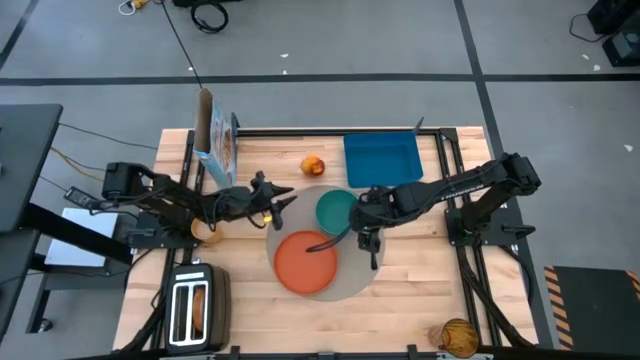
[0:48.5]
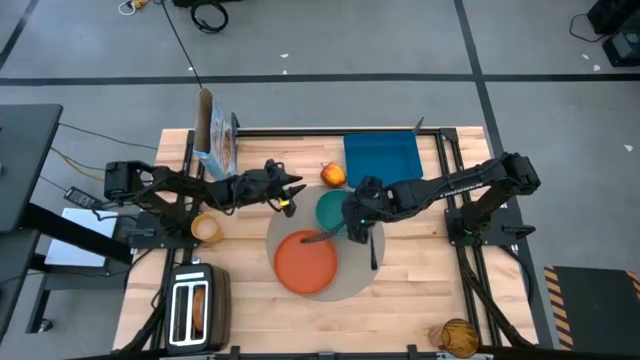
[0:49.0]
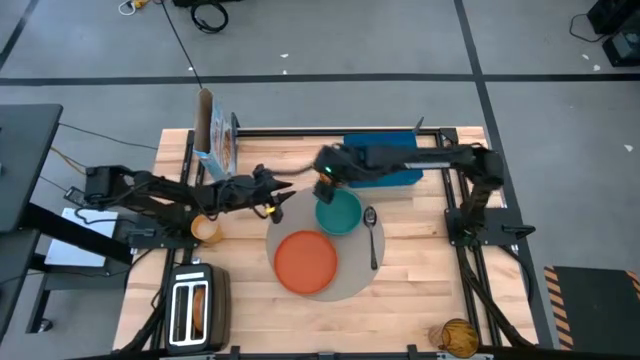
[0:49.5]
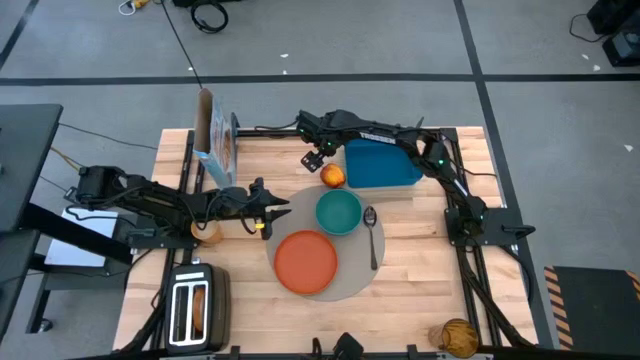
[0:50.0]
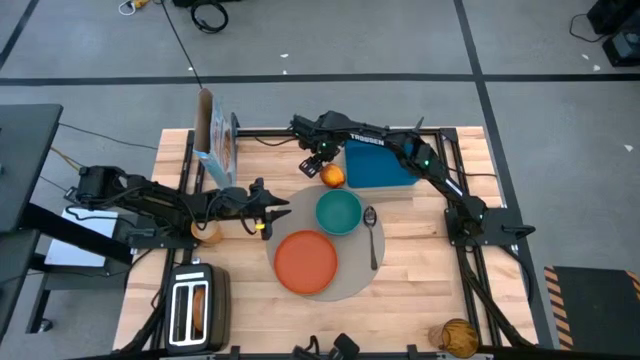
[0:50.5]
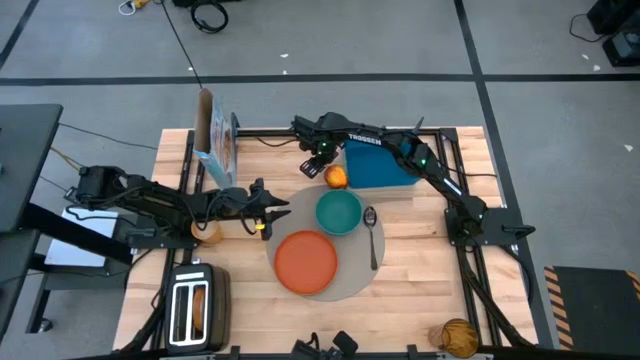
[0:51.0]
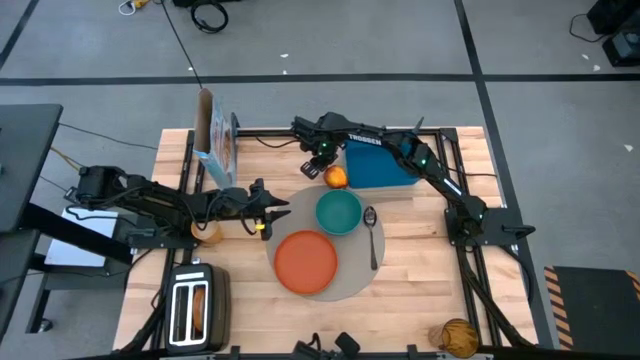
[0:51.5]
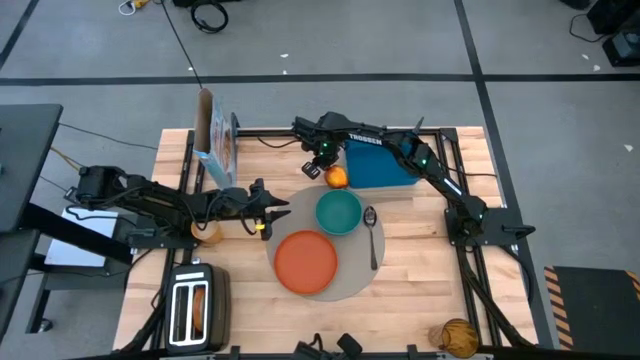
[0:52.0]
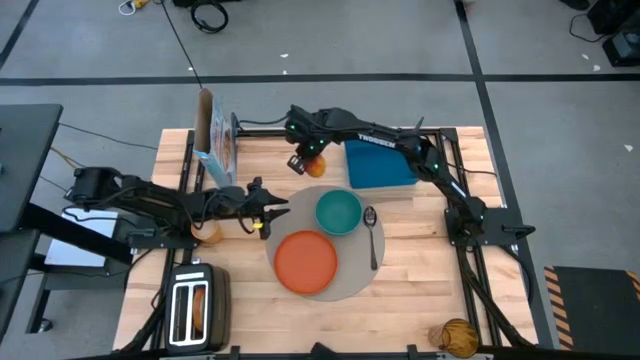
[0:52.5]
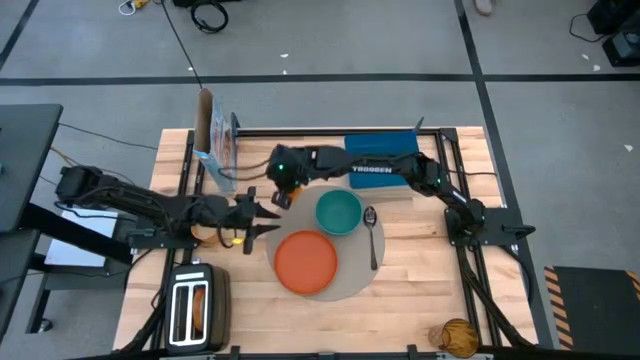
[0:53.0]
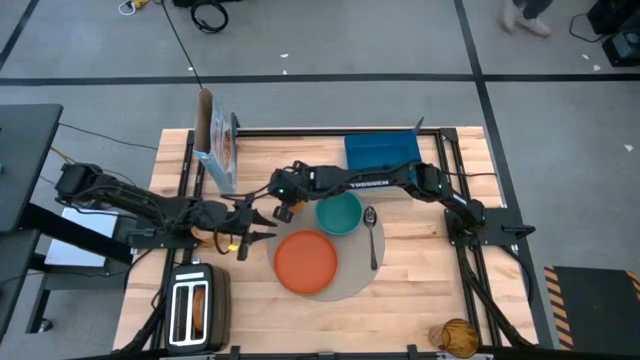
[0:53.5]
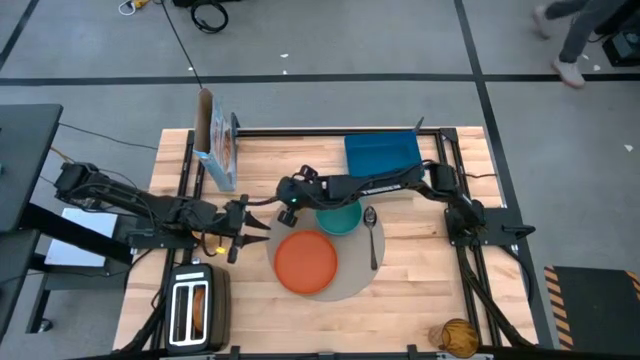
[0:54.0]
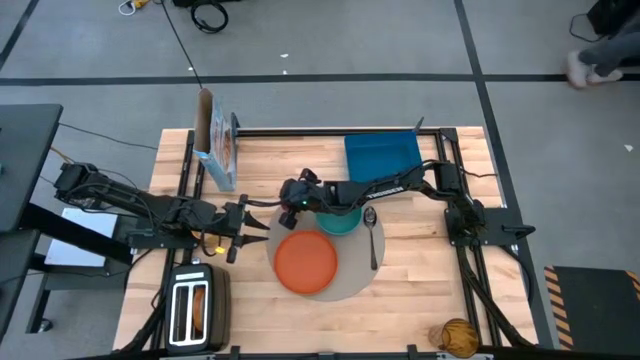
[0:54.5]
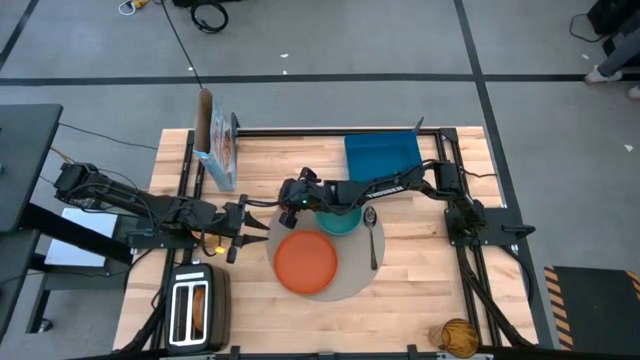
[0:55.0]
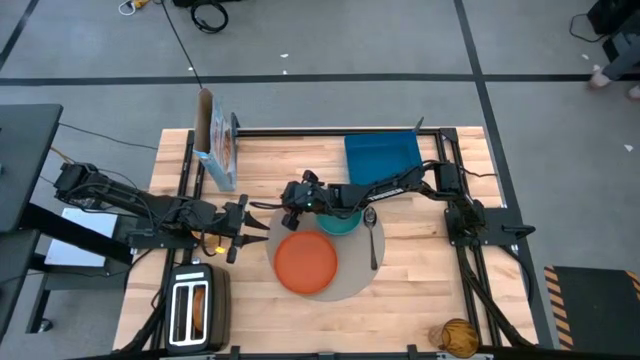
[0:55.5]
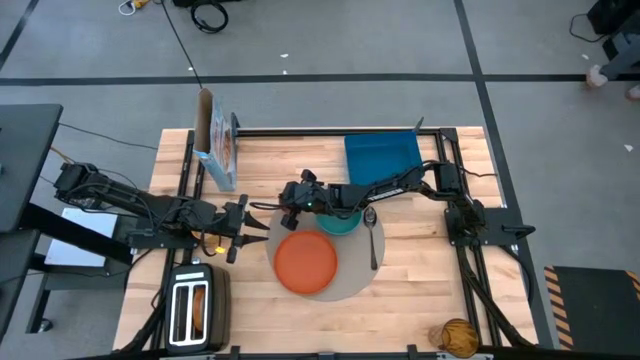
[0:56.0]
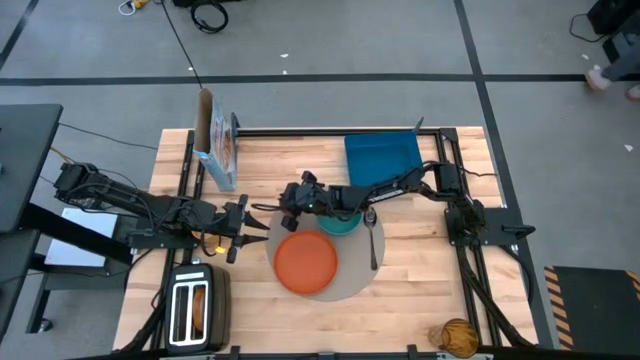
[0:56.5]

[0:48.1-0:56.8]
Task: Arrange a breakfast setting
Put the apple on top left of the round table mat

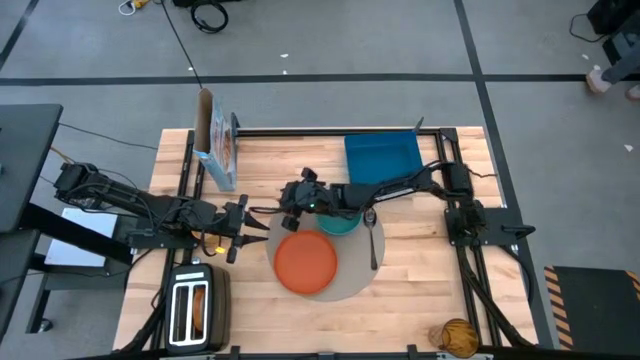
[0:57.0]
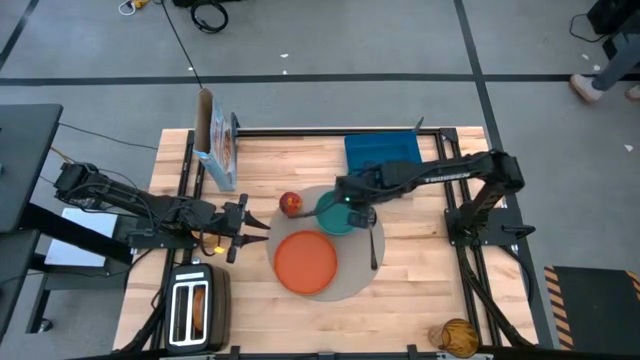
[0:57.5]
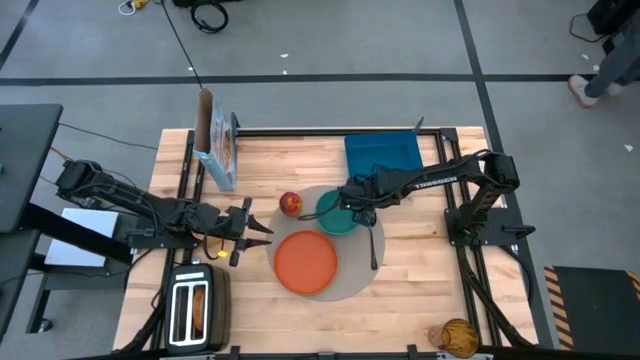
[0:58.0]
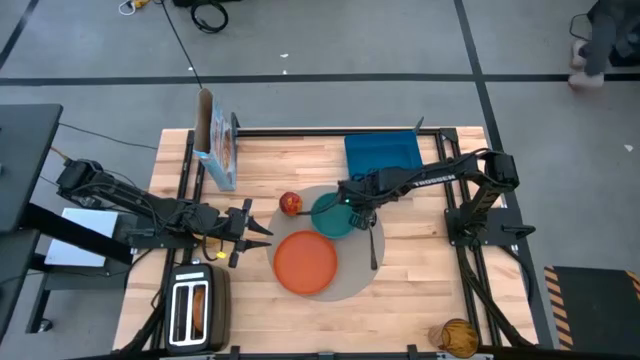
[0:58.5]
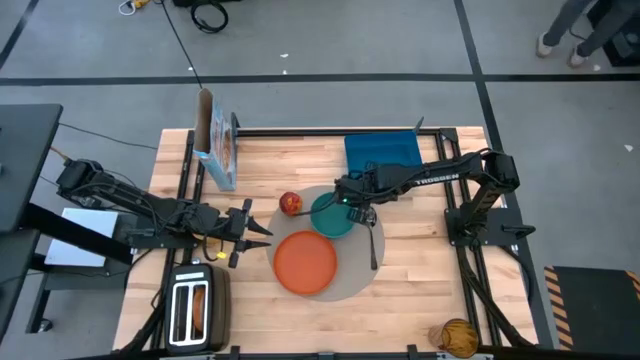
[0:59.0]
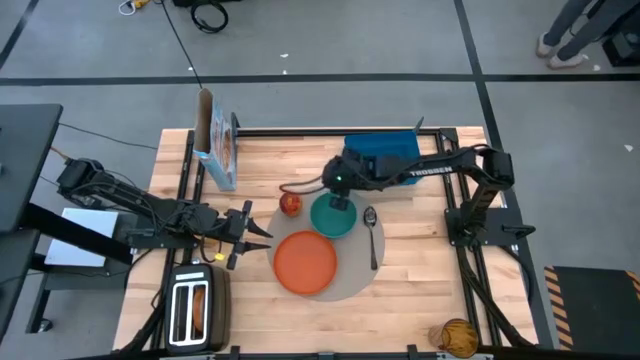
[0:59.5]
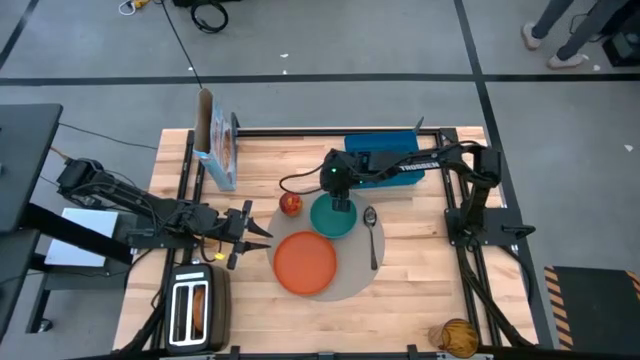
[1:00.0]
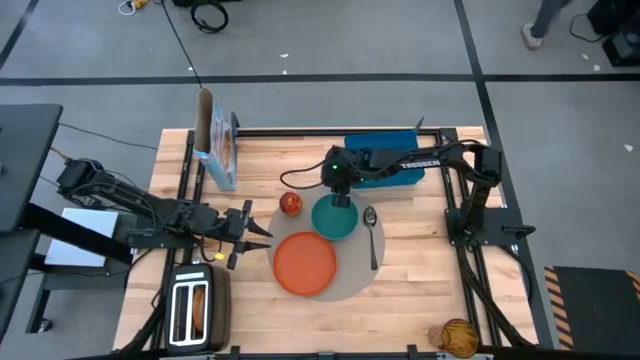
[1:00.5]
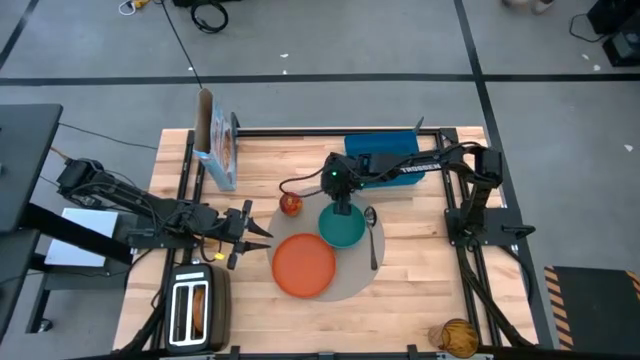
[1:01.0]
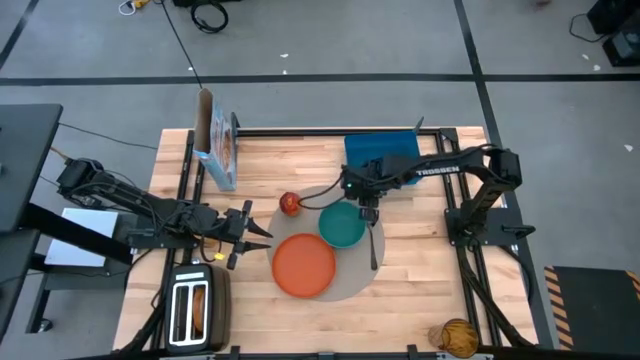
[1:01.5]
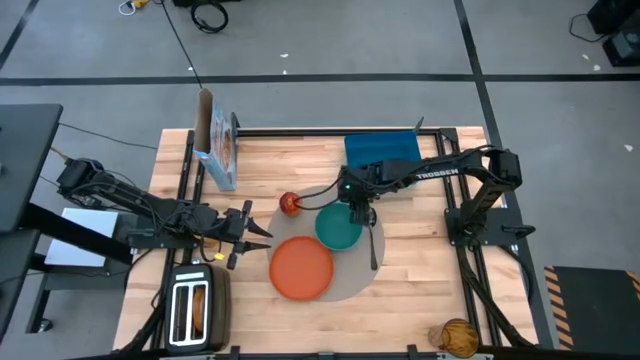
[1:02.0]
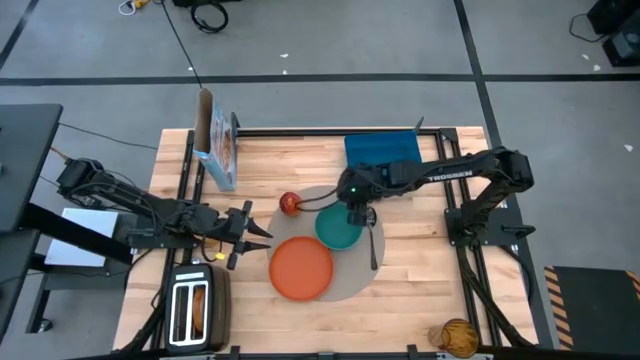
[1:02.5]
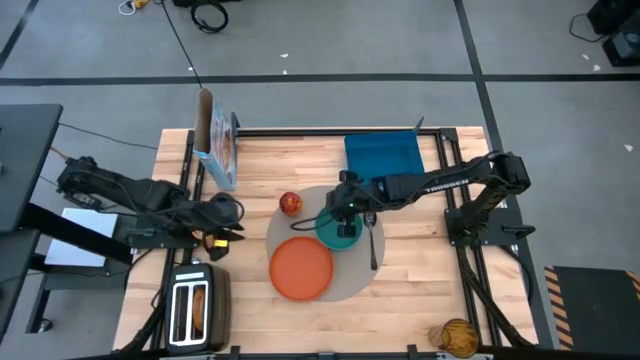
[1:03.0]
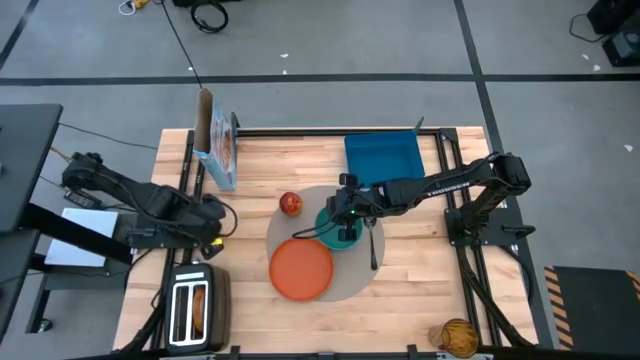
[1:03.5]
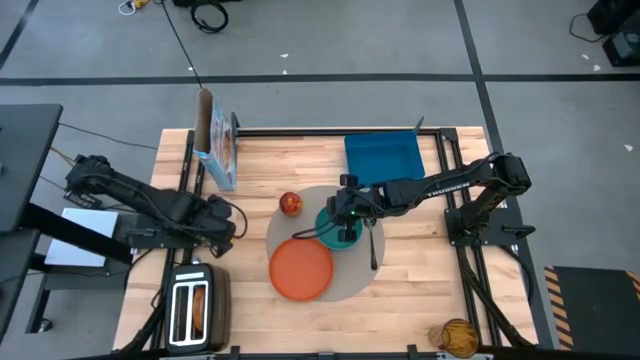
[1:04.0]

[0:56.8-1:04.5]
Adjust the blue bowl position

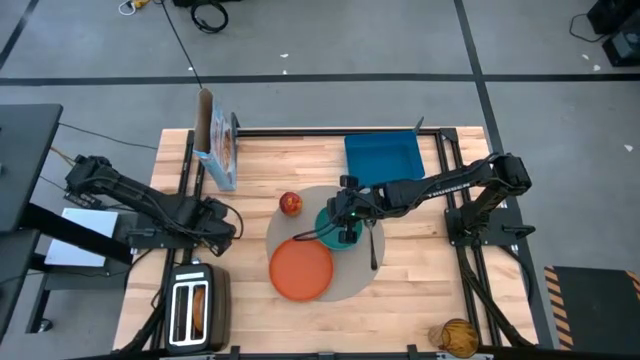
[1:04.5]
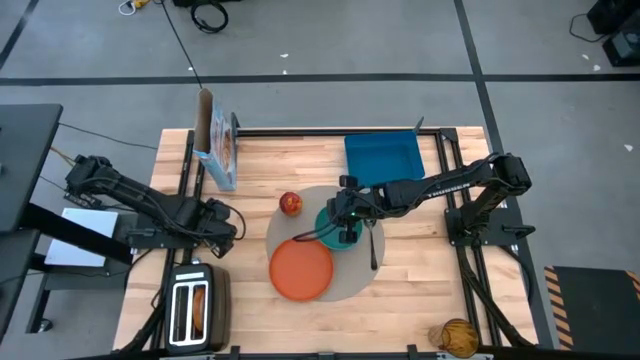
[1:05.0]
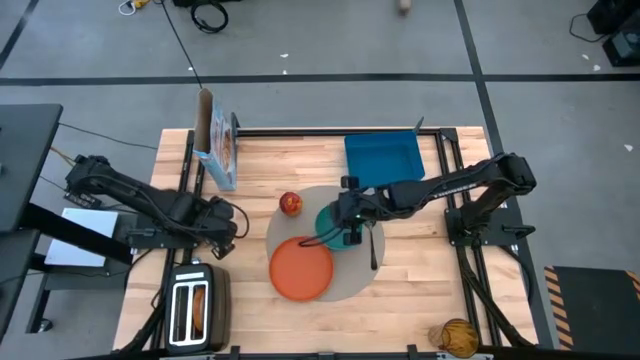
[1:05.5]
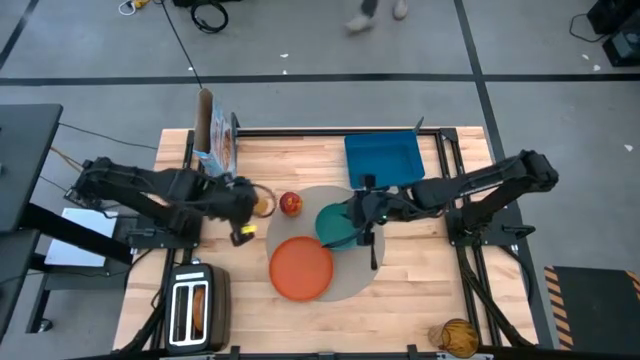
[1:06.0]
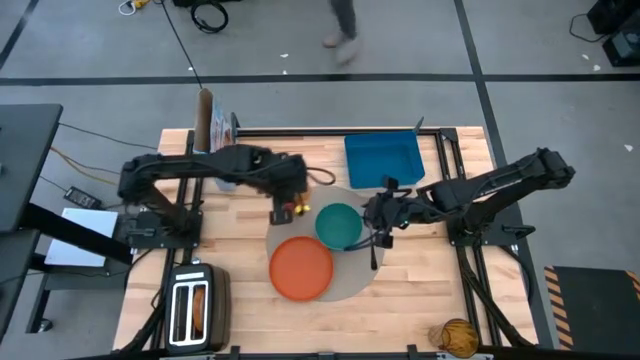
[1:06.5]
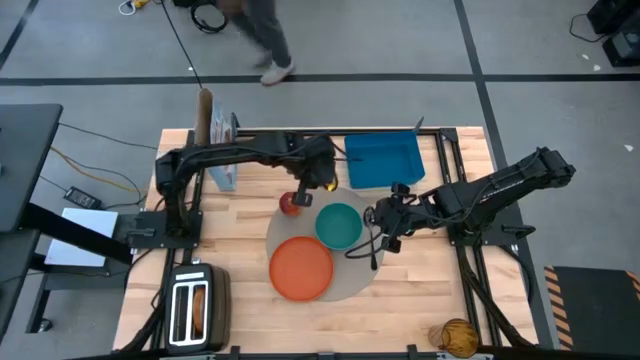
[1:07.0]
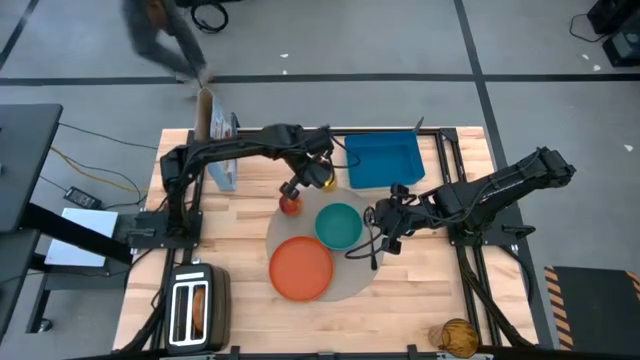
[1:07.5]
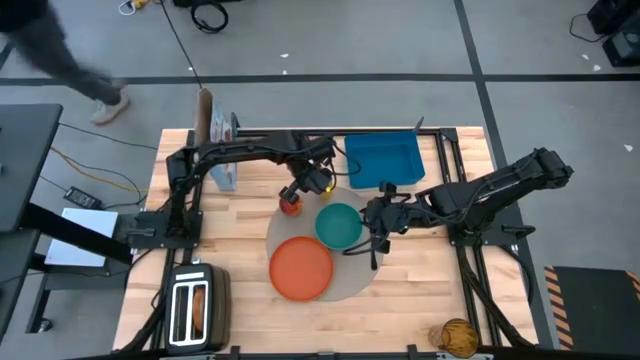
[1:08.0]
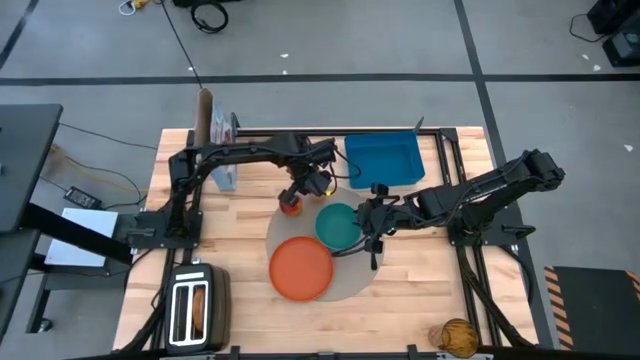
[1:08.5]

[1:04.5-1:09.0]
Put the orange cup with rice grain on top right of the round table mat

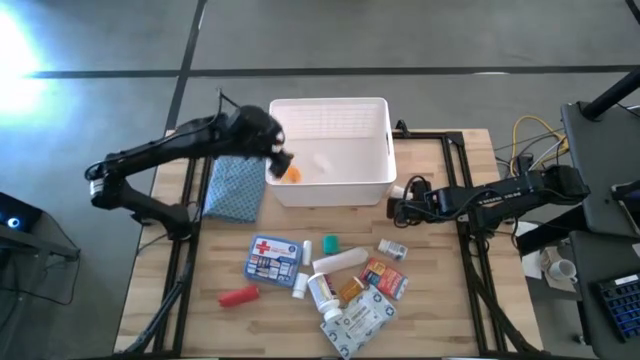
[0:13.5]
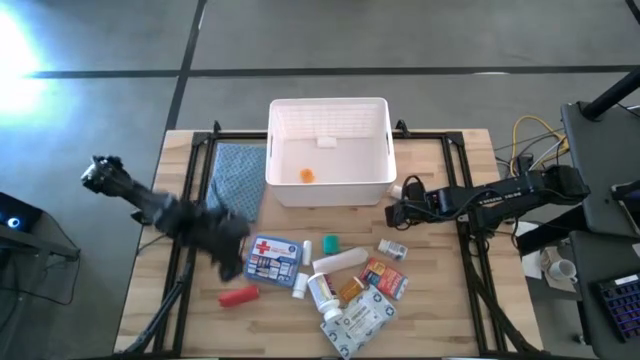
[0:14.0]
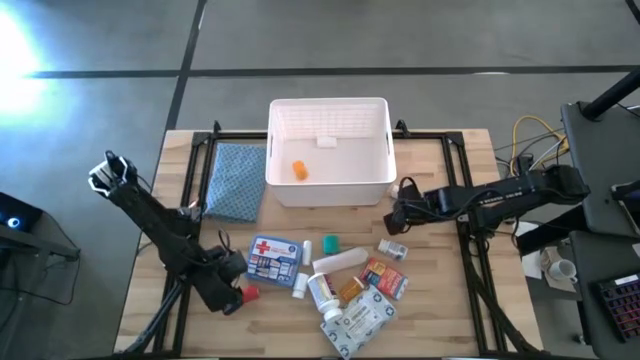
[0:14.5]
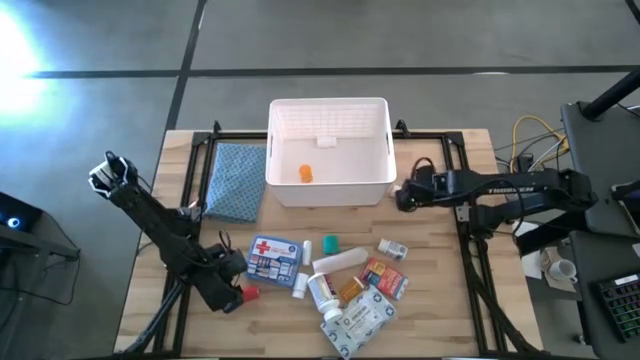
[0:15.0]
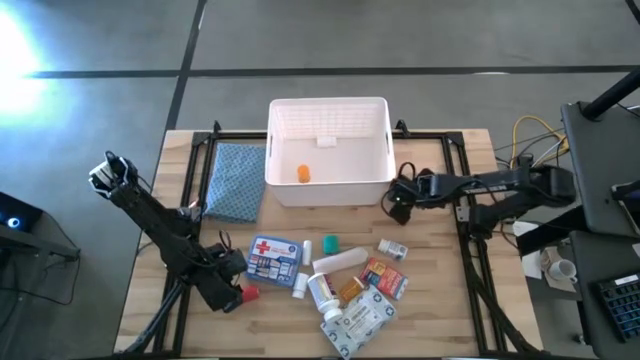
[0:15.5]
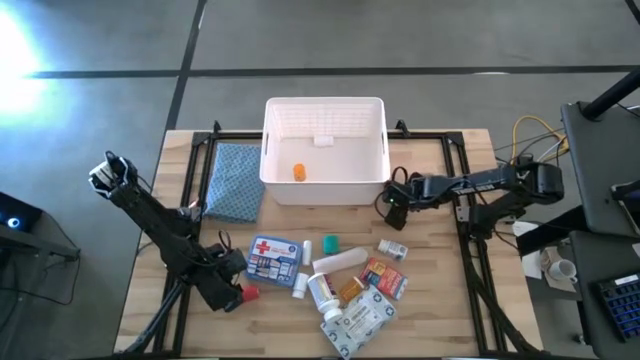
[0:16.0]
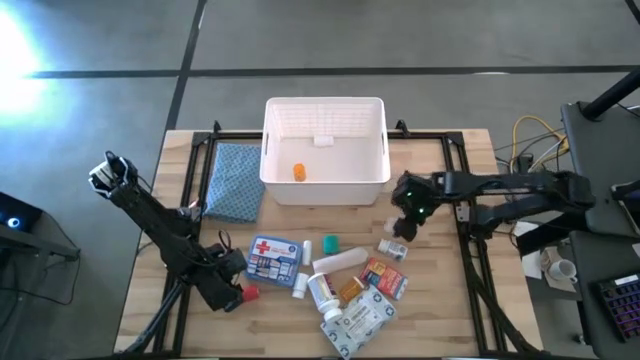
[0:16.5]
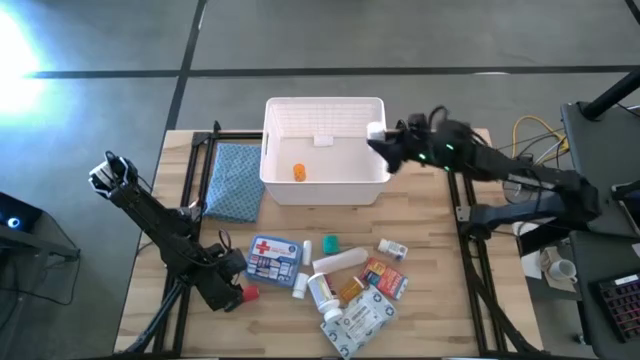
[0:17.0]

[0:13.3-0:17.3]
Task: Pick & place medical supplies in basket/bin
Put the white pill bottle into the white bin
